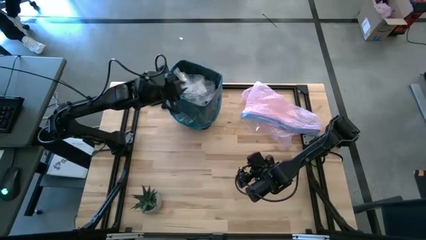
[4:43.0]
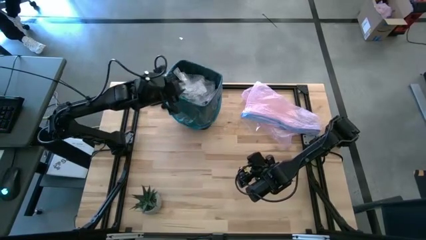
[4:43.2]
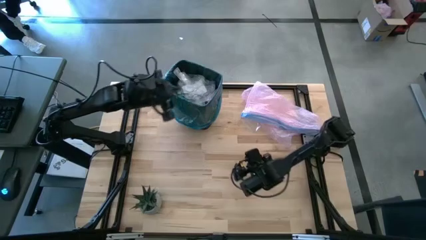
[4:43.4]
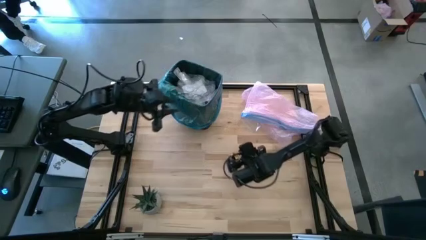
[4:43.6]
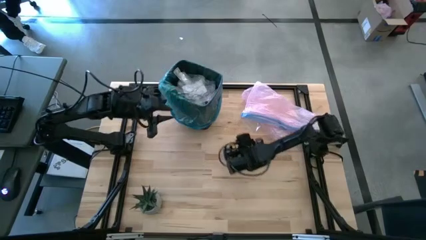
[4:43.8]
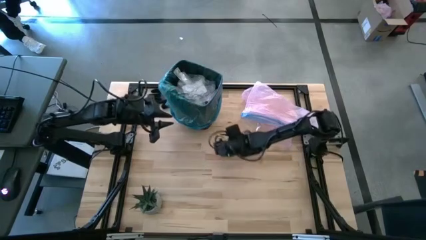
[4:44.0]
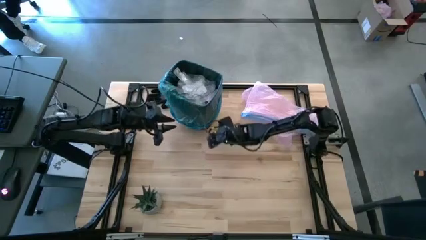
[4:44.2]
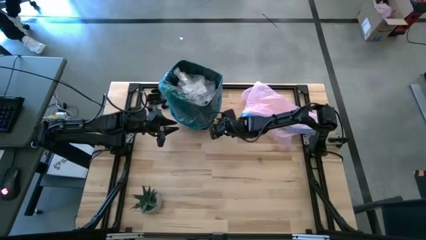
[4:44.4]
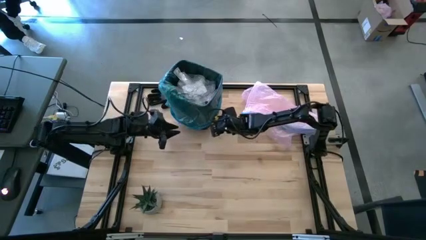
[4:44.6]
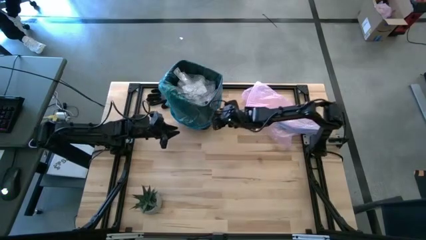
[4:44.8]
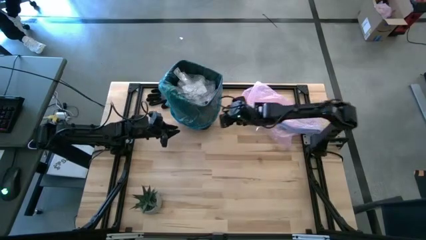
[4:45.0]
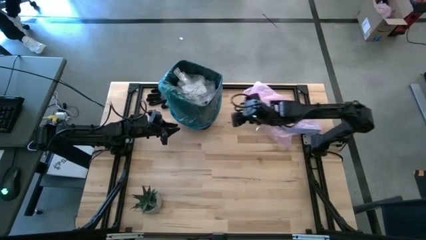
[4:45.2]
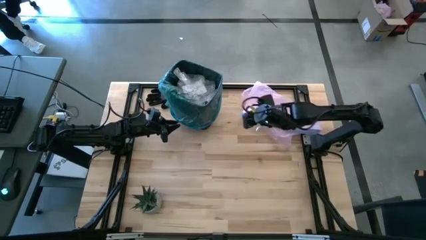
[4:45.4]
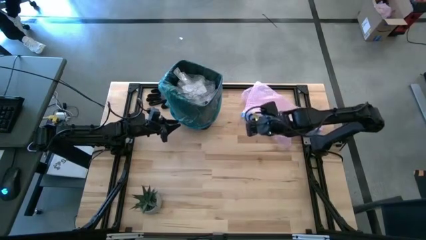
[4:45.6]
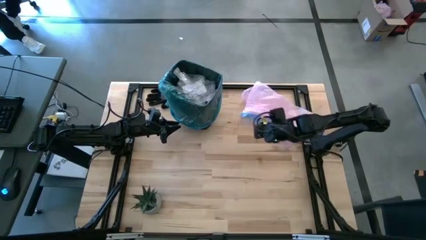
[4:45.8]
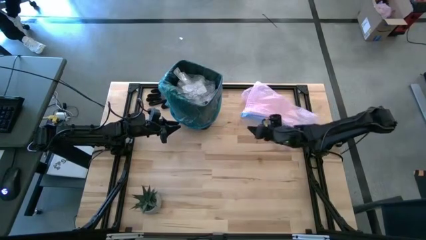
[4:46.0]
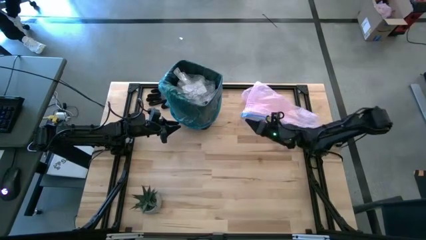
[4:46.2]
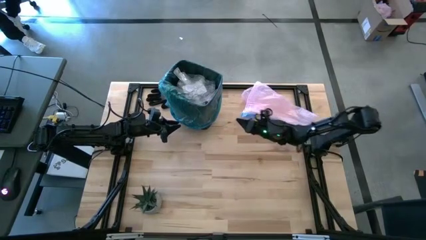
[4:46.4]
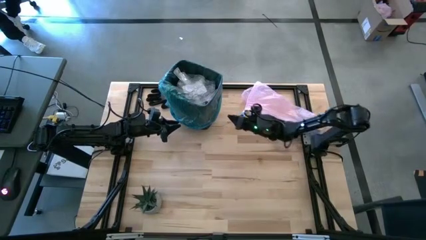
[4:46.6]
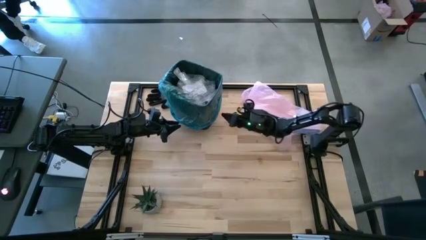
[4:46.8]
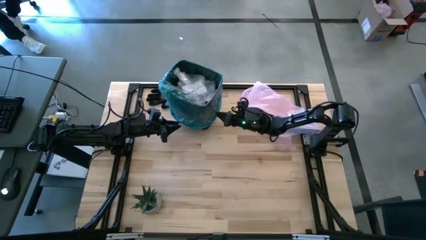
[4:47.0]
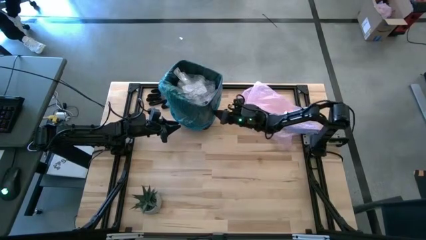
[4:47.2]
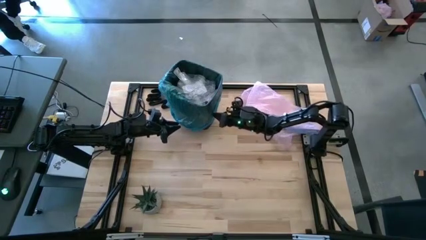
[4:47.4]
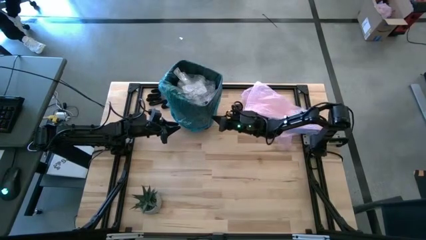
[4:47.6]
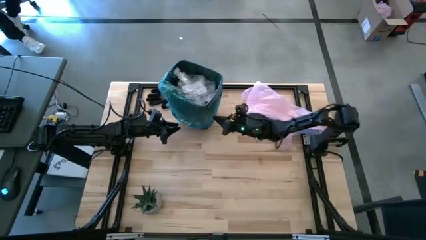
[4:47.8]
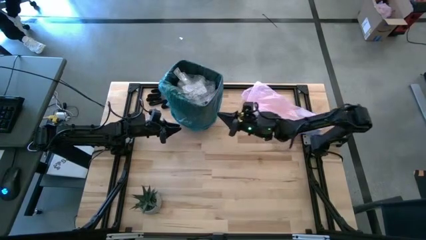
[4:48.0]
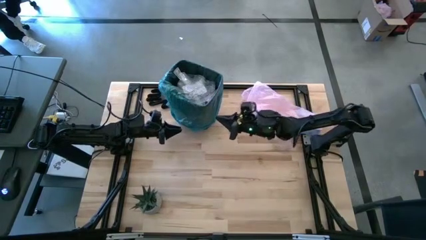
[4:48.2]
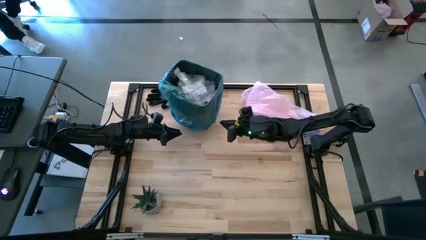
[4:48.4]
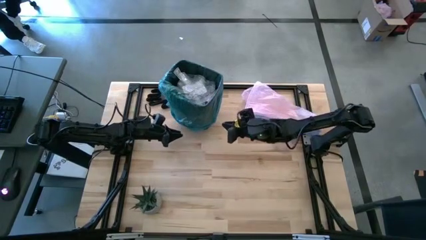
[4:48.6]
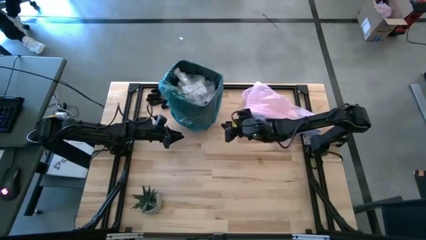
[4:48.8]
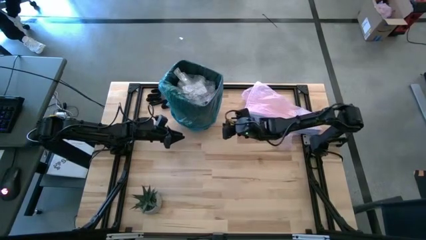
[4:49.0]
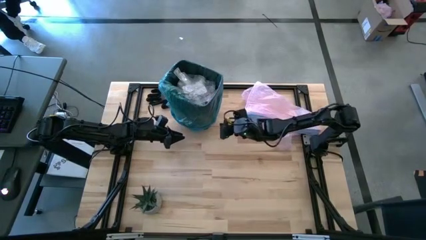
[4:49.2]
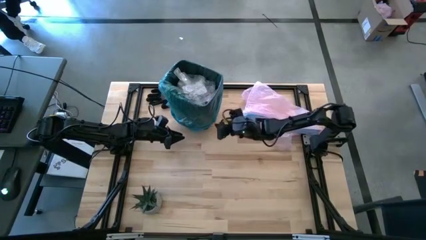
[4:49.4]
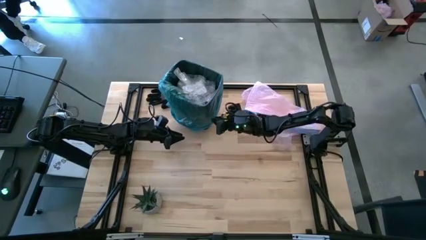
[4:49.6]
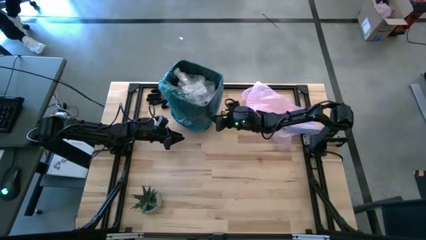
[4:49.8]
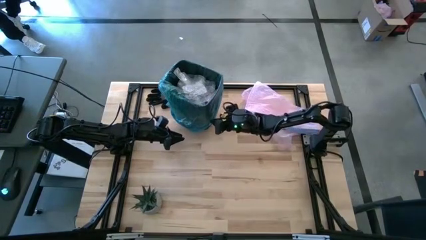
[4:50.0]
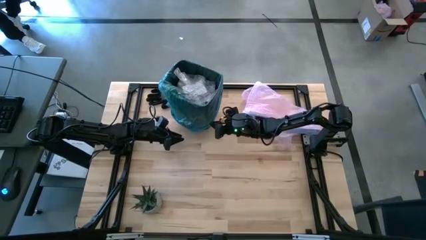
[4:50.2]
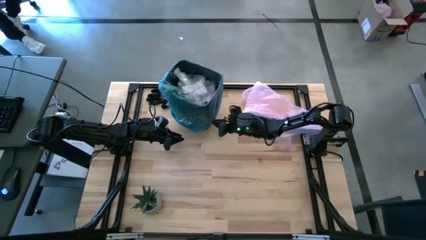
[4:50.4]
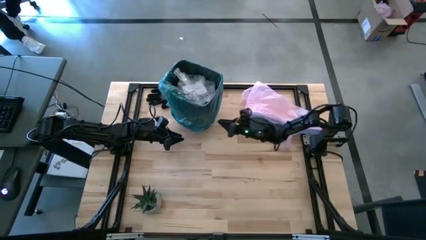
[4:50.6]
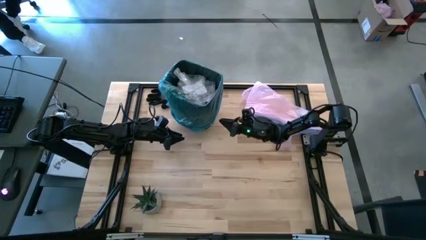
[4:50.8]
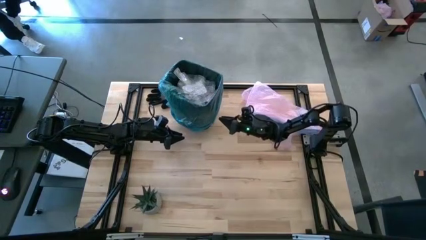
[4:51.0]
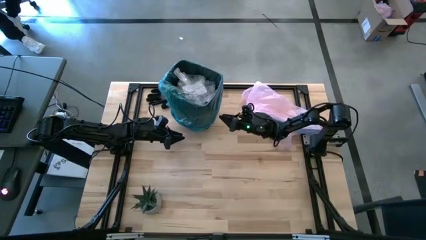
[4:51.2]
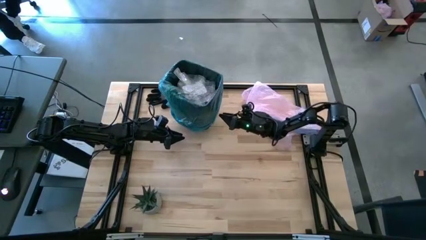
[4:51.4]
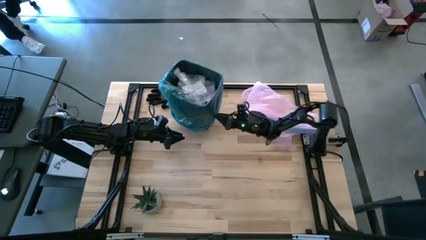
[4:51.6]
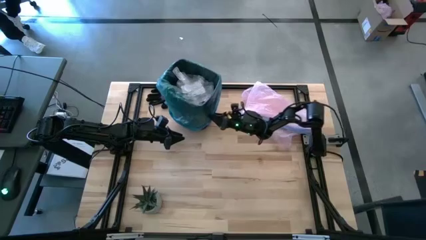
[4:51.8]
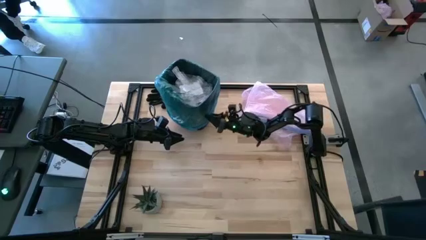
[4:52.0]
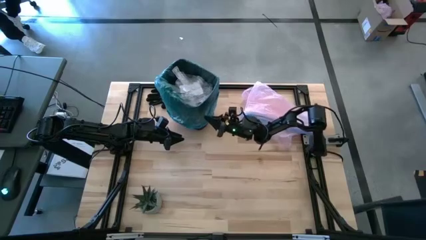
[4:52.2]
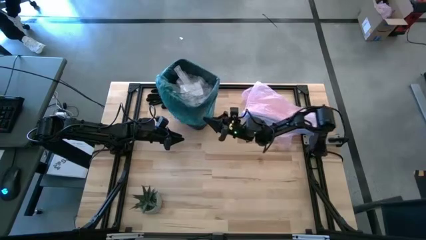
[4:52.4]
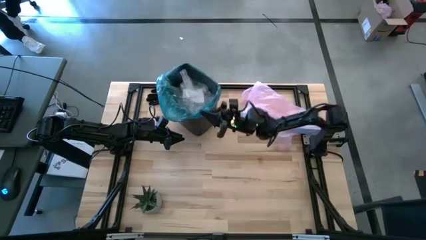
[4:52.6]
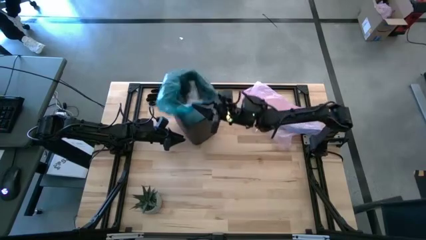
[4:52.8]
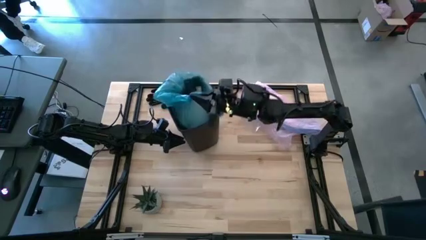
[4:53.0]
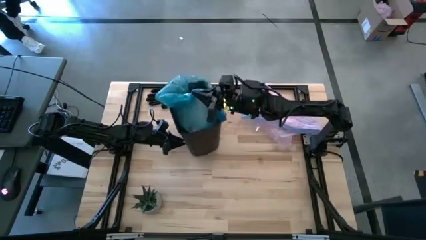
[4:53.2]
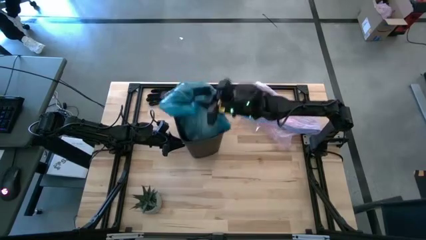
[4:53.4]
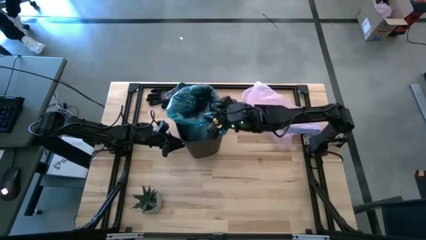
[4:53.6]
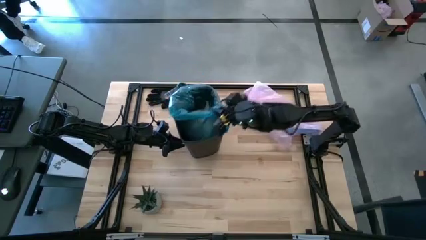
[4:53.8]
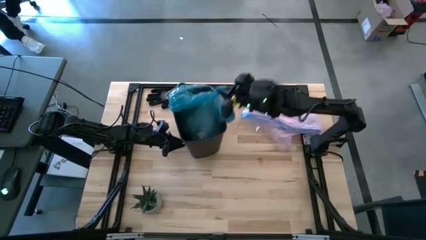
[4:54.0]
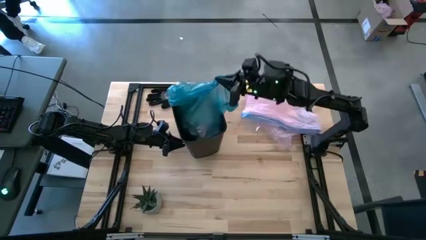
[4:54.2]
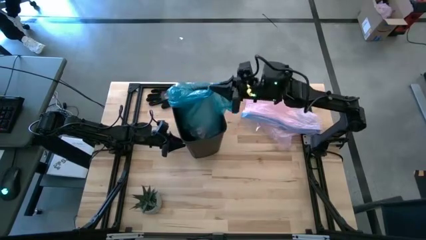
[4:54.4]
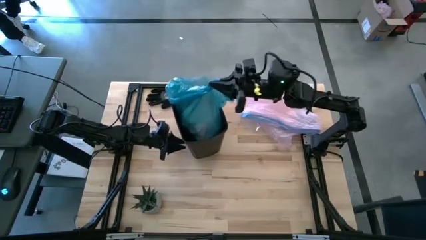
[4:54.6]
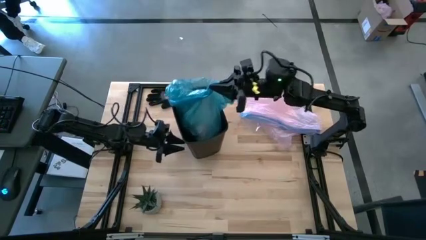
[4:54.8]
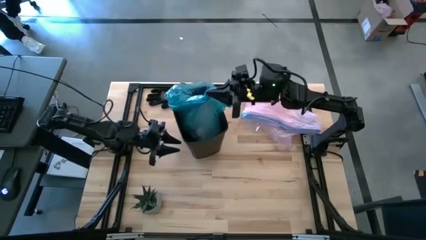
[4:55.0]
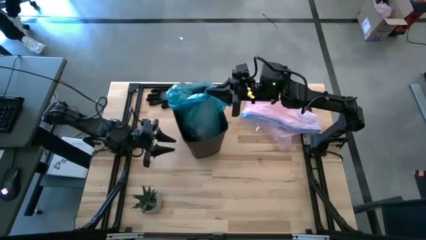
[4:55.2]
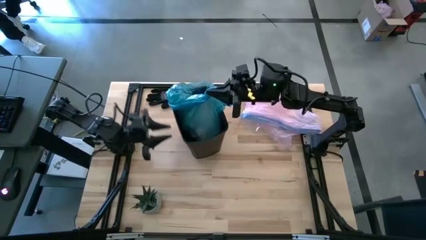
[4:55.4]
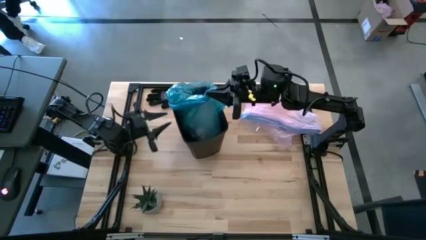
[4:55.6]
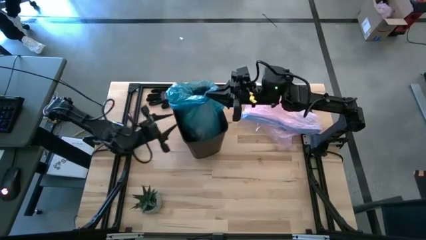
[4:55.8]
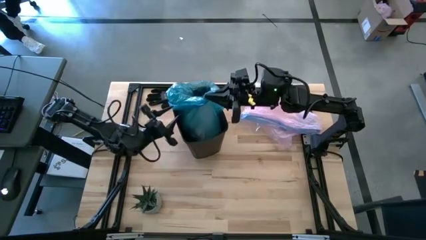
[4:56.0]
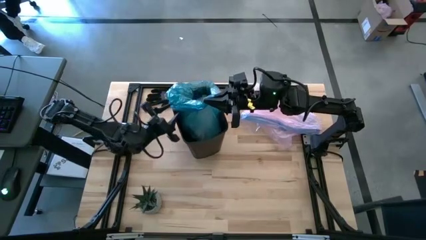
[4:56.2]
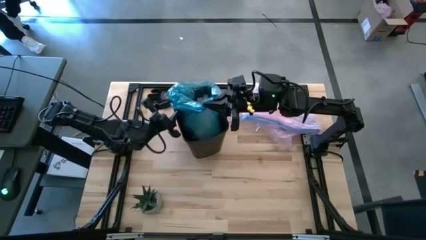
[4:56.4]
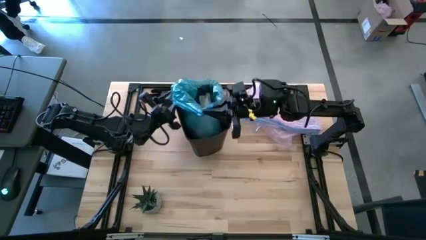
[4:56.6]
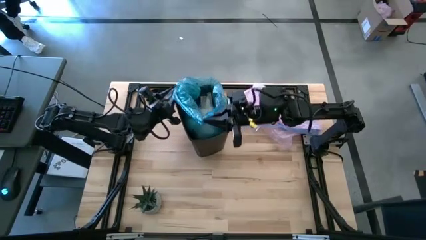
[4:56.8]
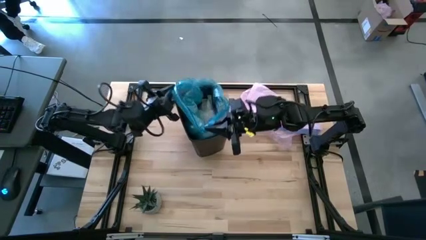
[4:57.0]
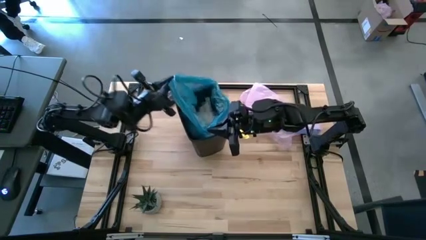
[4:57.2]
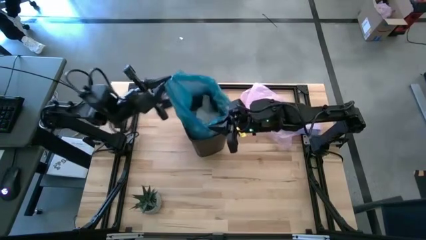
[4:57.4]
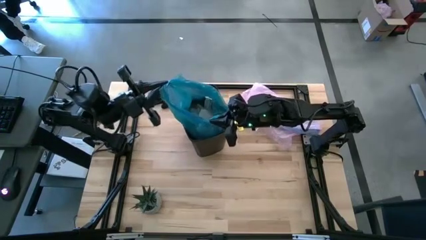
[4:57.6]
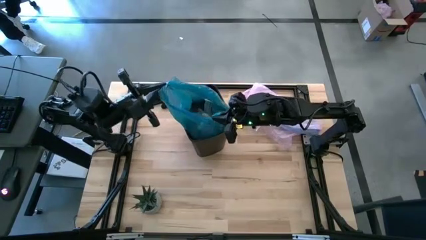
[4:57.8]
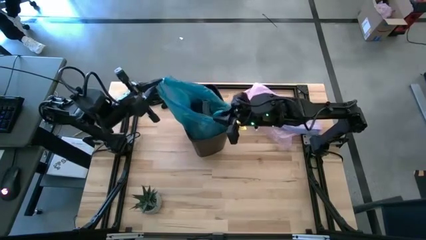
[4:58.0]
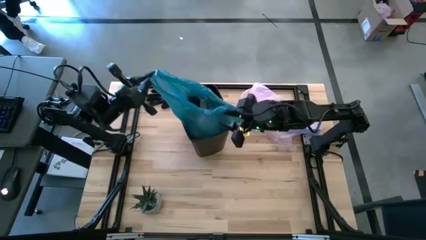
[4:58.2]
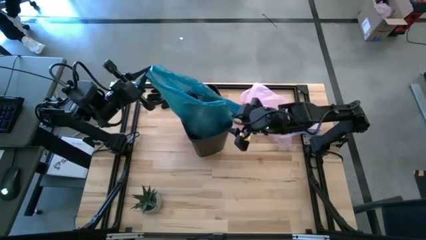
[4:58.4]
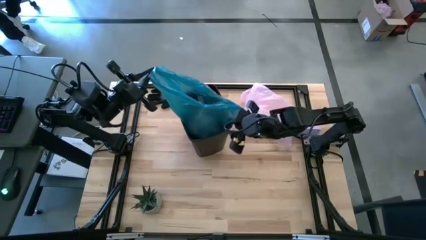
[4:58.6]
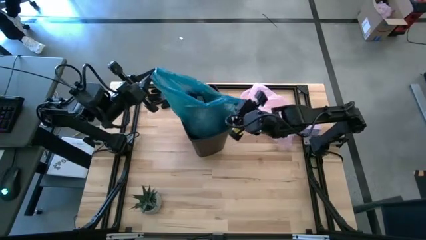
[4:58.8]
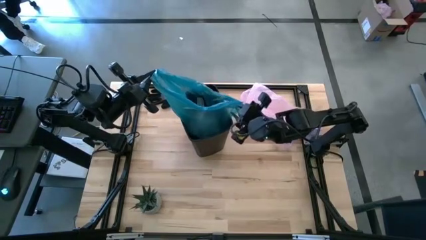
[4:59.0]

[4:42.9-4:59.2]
Task: place trash/remove bag and relplace
Remove the blue trash bag from the trash bin
